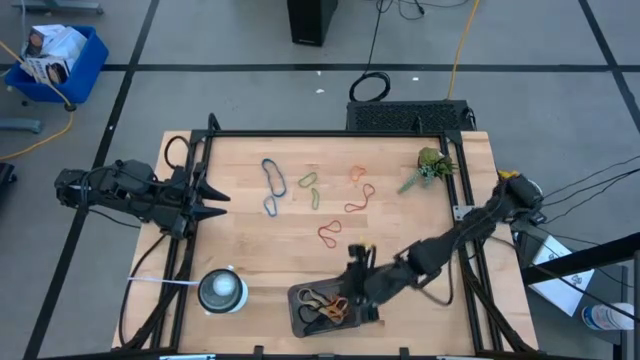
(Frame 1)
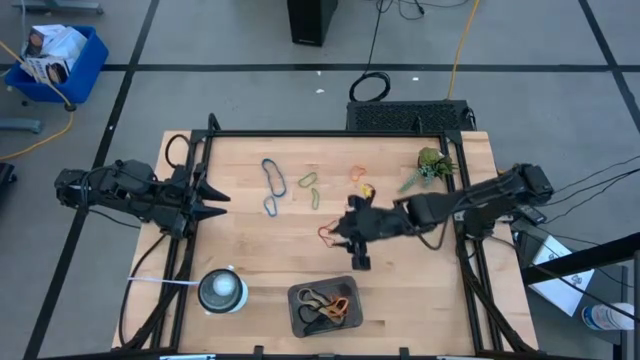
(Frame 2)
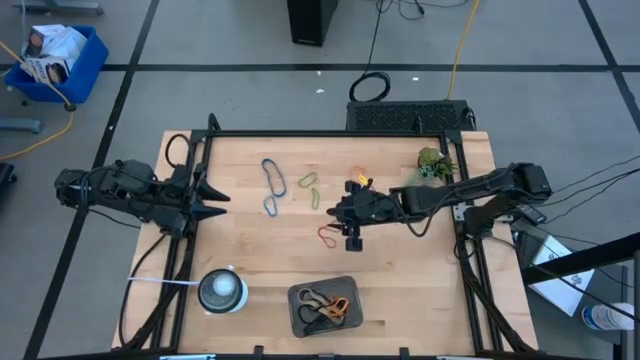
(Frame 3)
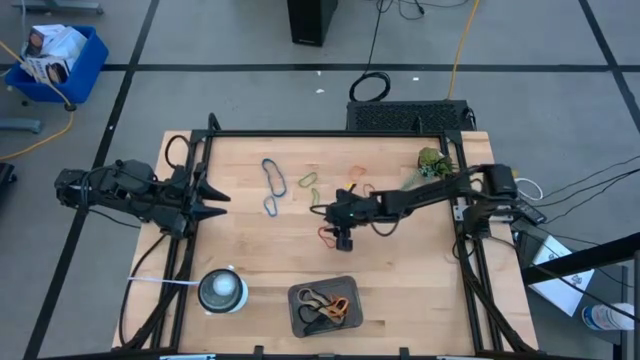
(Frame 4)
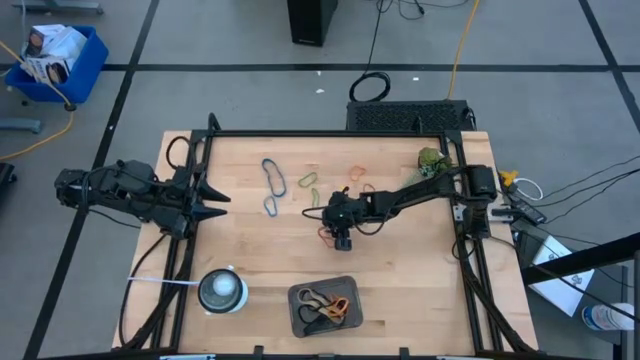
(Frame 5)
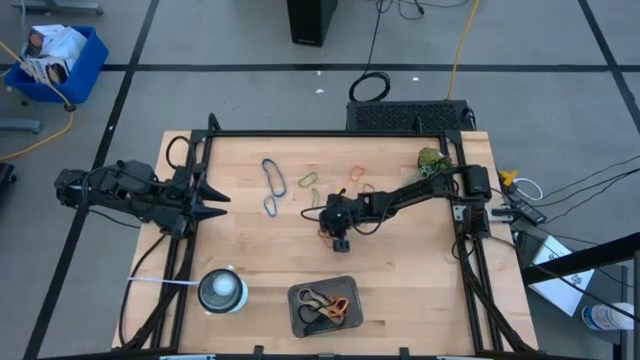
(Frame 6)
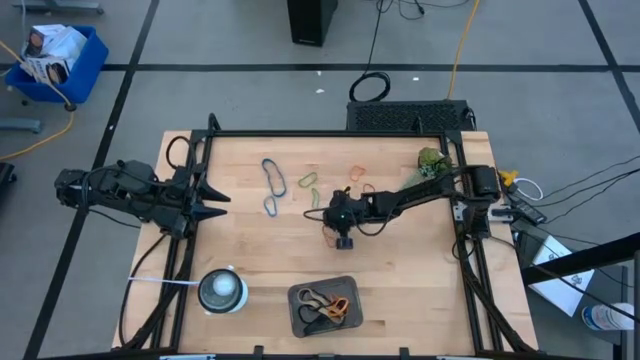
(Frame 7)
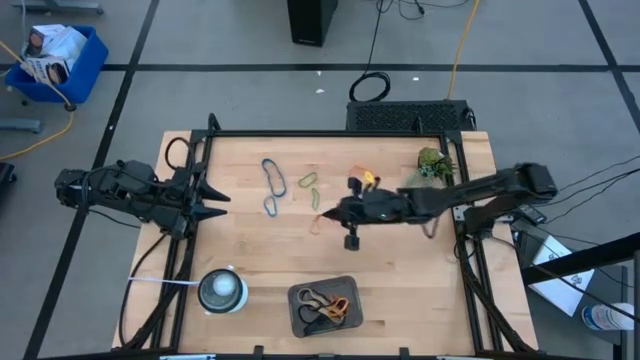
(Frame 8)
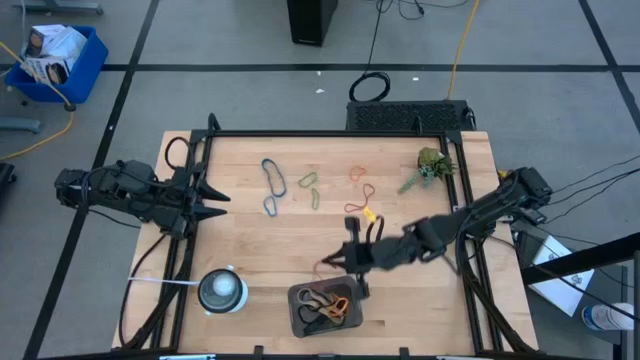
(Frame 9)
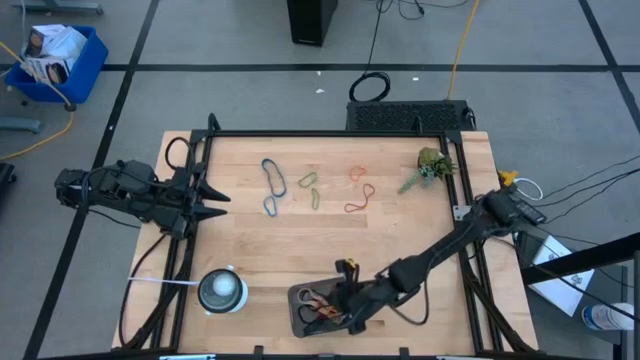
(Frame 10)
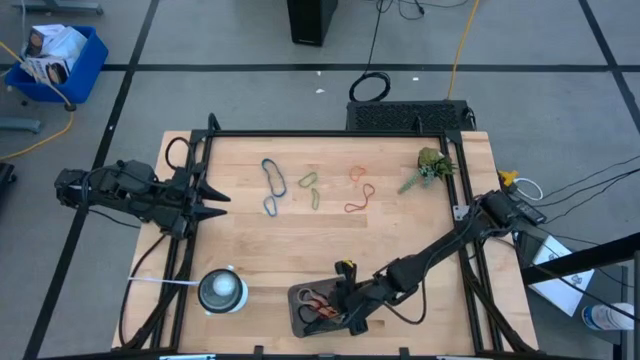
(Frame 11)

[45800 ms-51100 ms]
Task: Pick and place rubber bands into bin
Put the bottom red rubber band into the bin

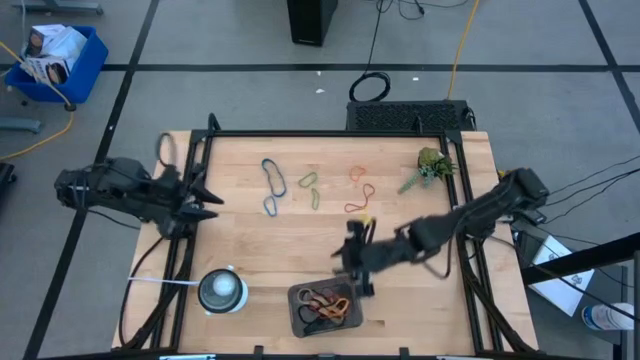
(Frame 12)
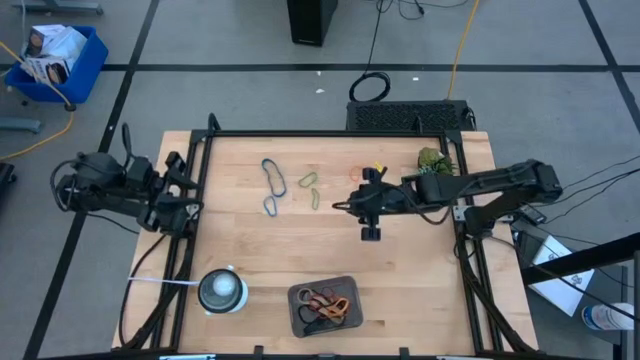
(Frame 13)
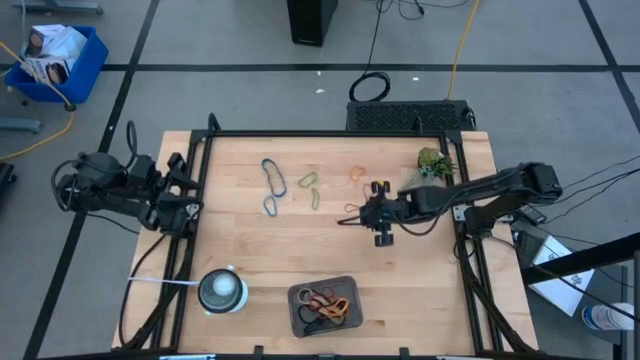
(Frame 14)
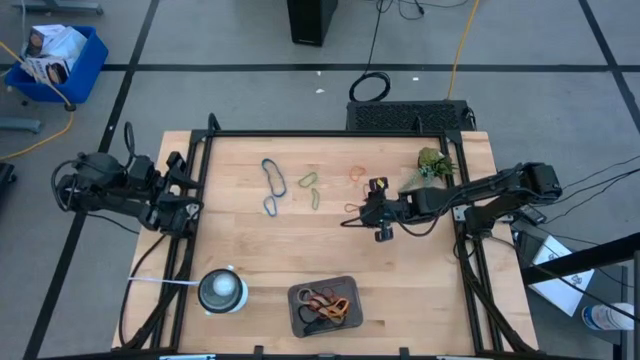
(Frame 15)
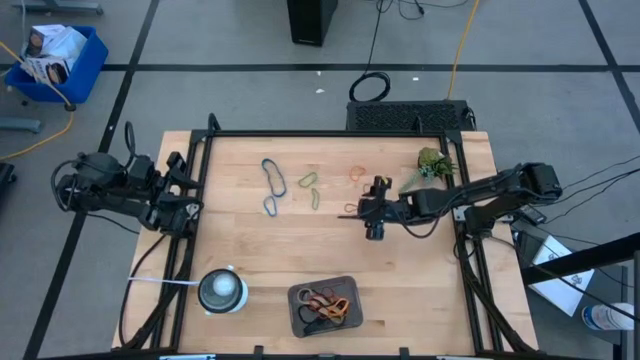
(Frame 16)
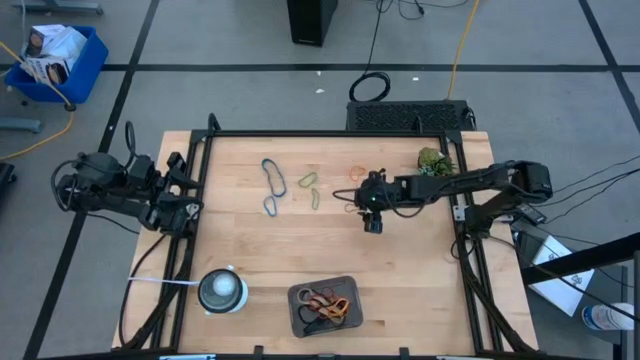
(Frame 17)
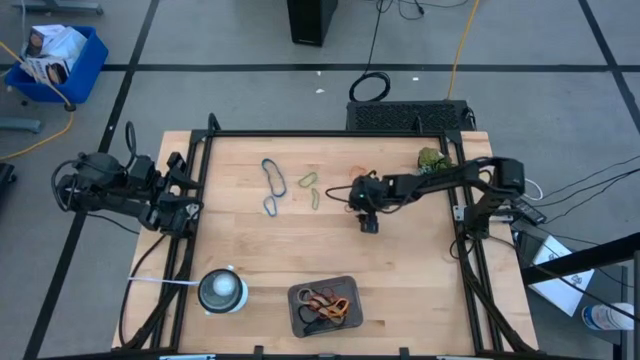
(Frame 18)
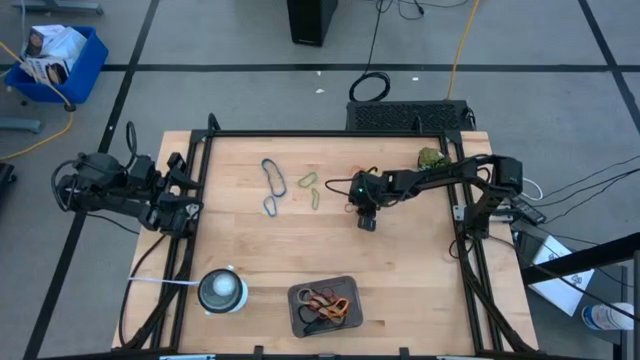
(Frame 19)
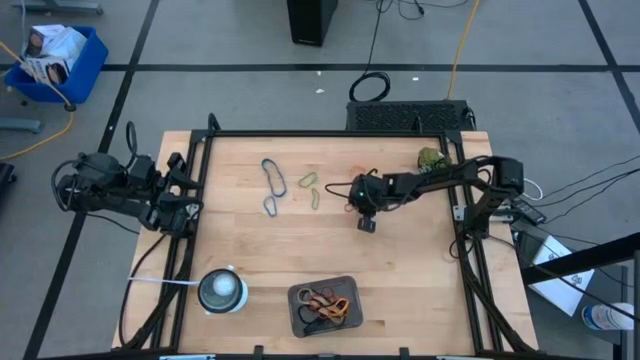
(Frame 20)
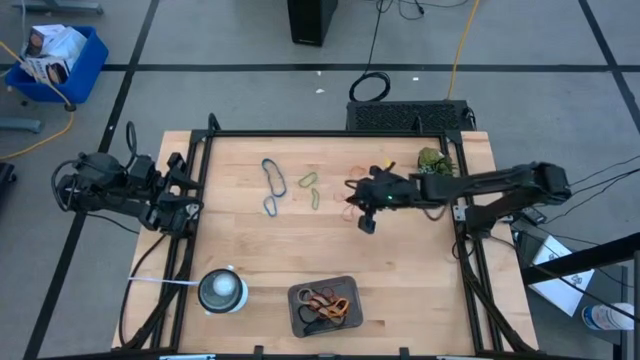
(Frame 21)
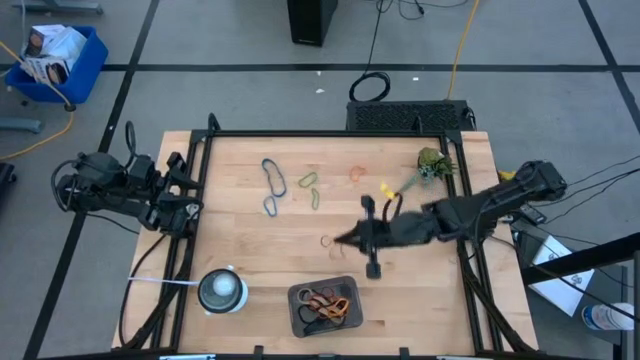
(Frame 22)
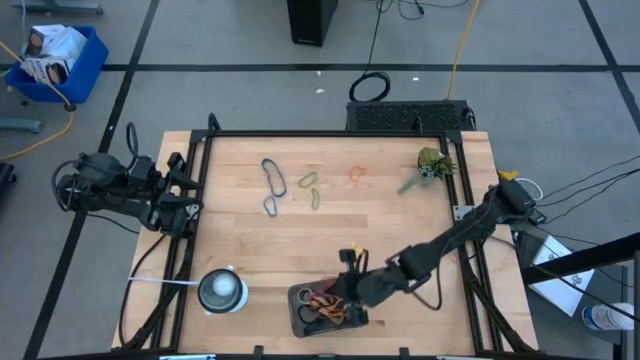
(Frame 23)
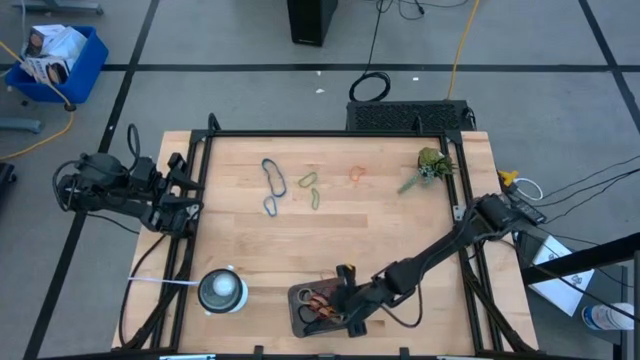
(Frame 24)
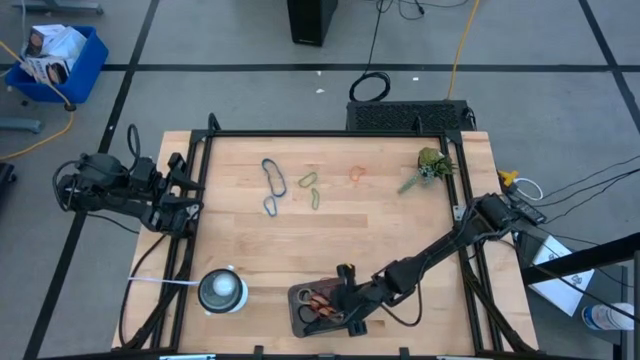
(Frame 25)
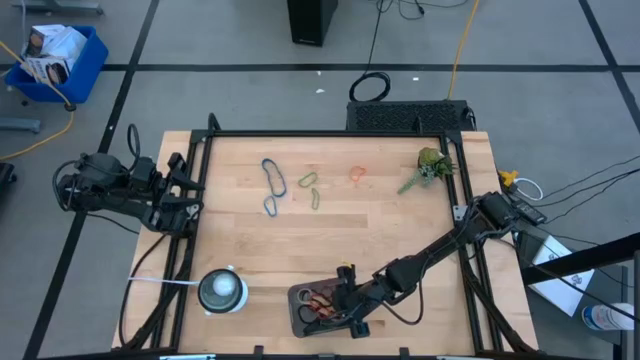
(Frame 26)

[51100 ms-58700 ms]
Put the red rubber band into the bin

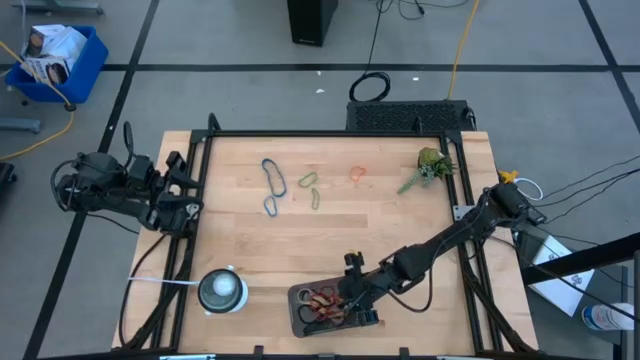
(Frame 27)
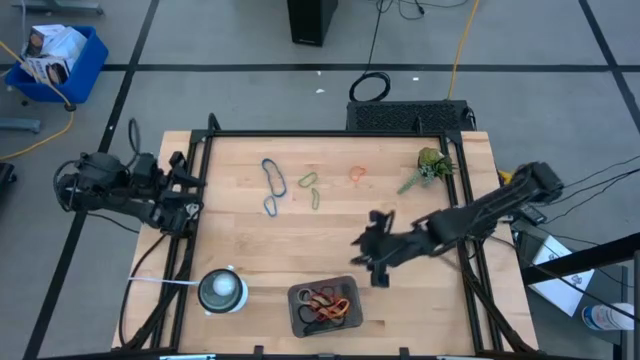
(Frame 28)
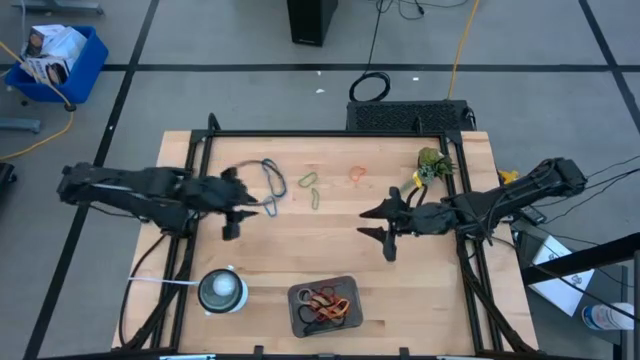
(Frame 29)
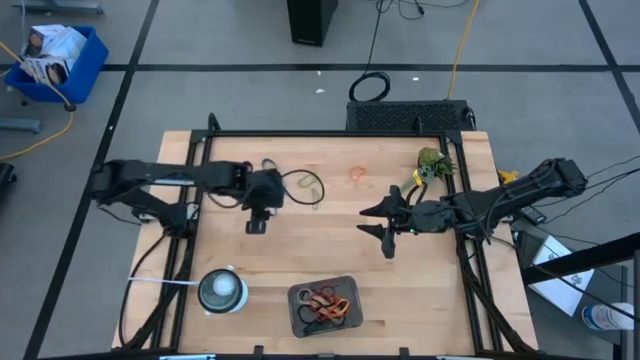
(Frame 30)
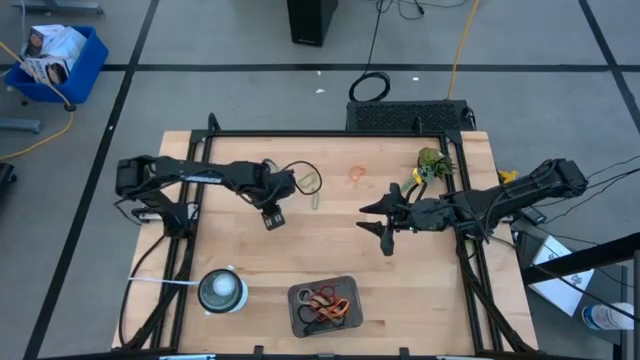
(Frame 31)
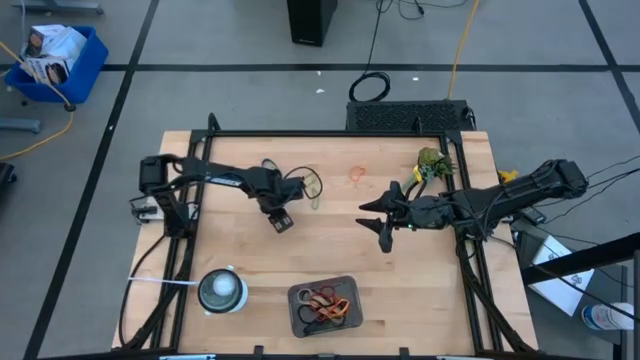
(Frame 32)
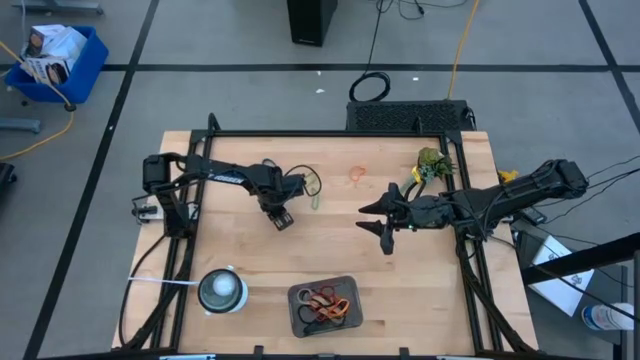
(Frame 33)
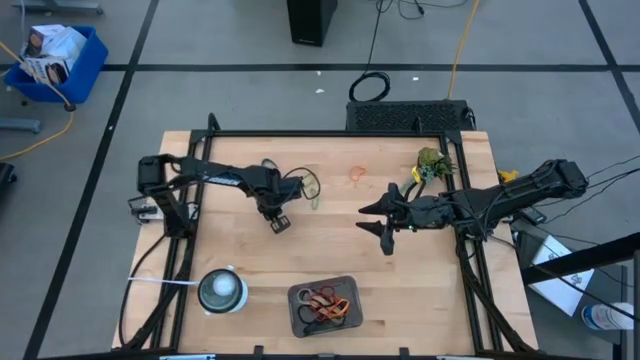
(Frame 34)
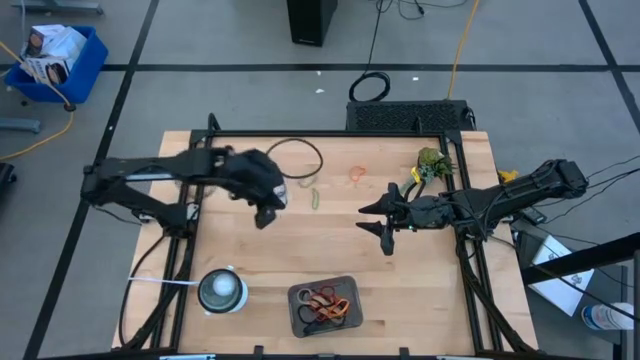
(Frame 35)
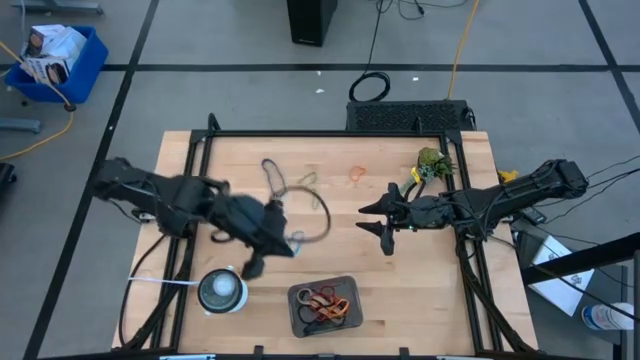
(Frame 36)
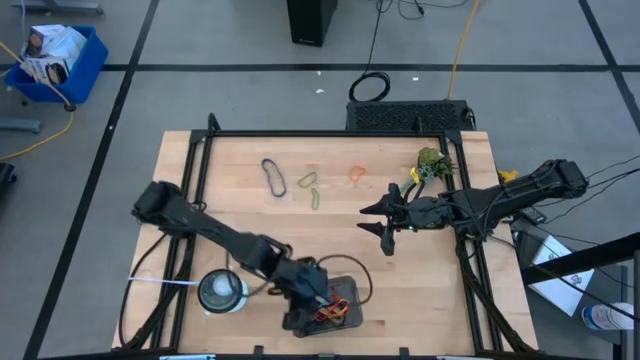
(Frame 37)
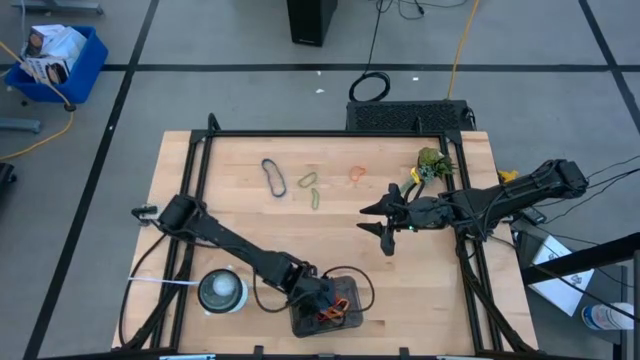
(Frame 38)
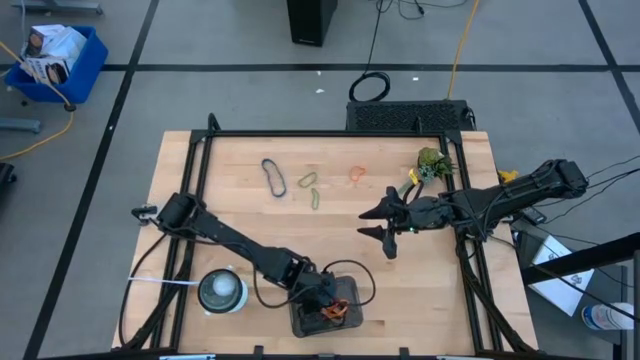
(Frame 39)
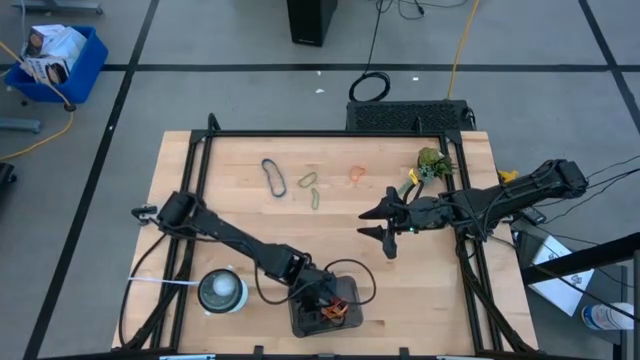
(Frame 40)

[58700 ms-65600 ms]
Put the bottom blue rubber band into the bin

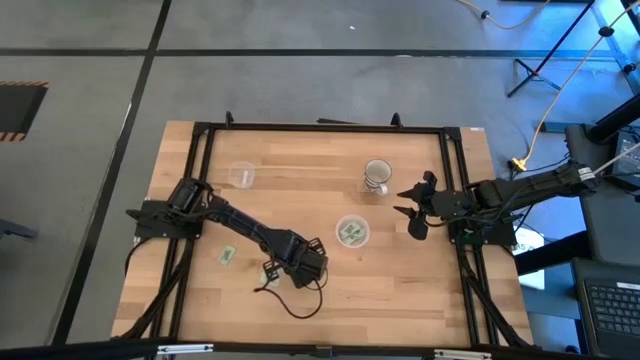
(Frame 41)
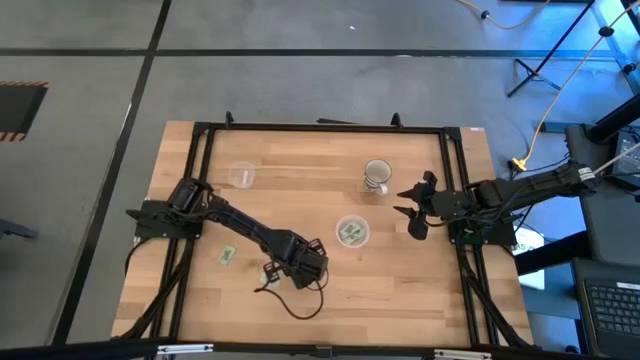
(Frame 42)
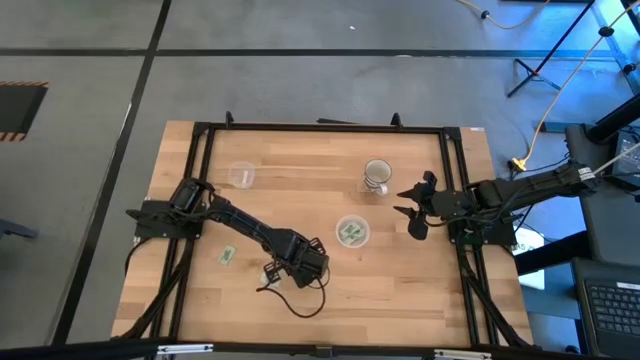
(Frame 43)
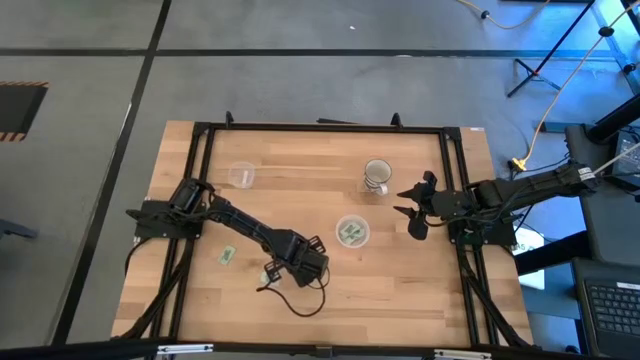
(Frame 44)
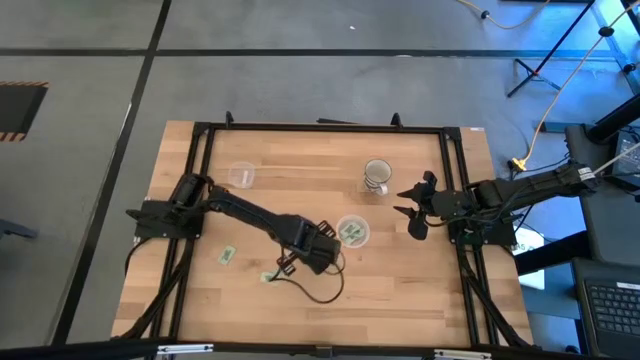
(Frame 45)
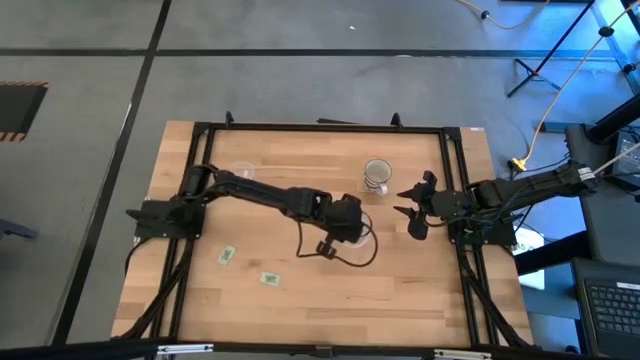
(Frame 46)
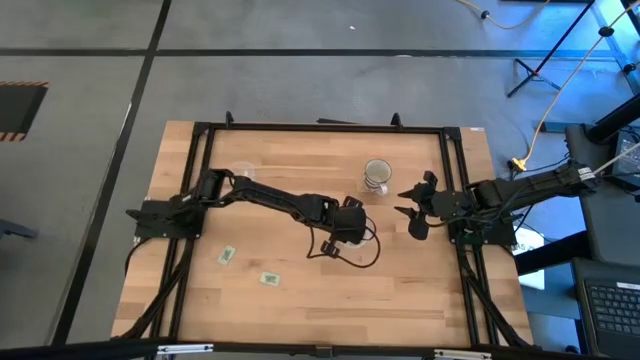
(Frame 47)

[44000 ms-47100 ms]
Task: Pick and place Stevia / Truvia into bins
Put the green stevia packet into the circular transparent container
